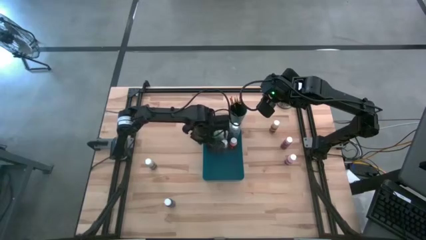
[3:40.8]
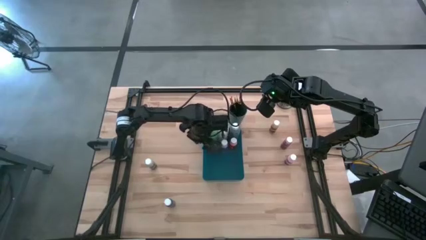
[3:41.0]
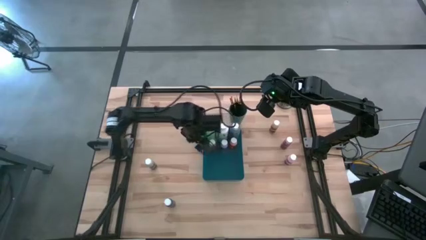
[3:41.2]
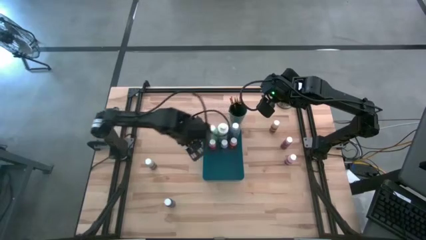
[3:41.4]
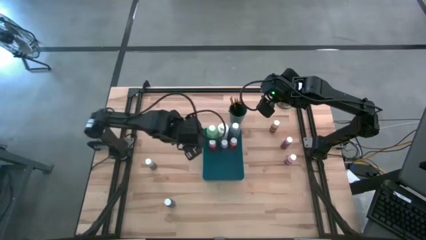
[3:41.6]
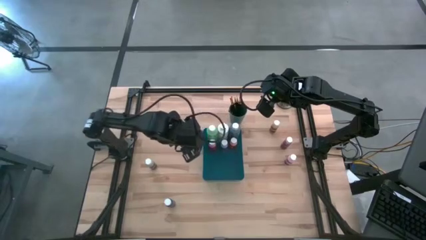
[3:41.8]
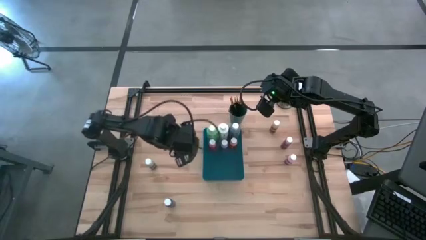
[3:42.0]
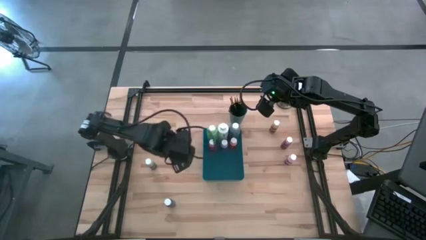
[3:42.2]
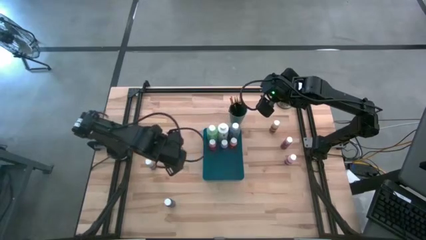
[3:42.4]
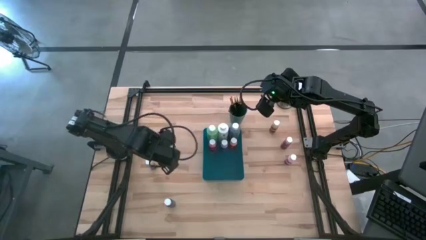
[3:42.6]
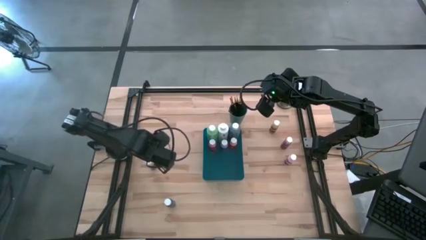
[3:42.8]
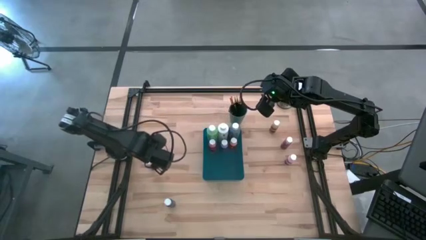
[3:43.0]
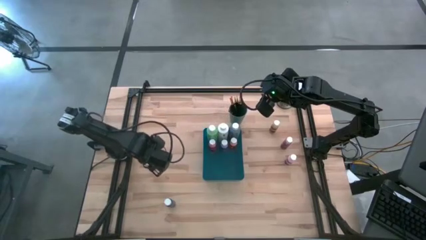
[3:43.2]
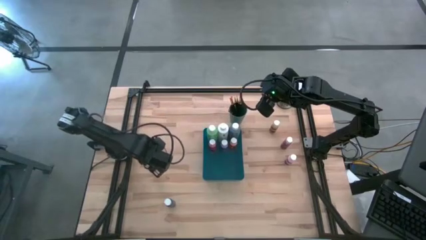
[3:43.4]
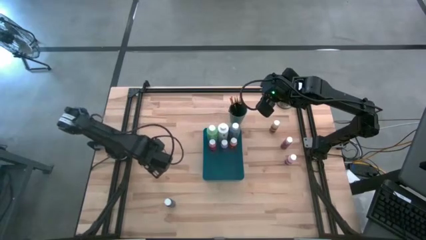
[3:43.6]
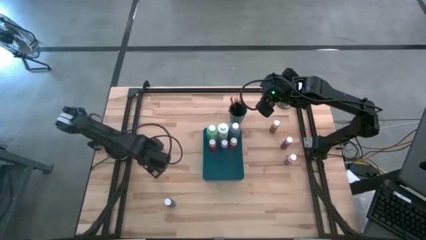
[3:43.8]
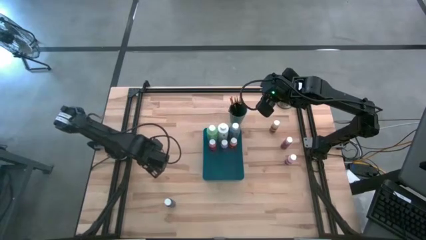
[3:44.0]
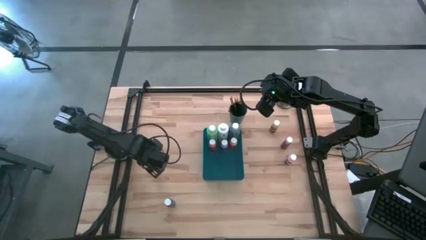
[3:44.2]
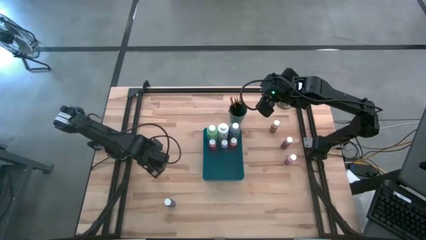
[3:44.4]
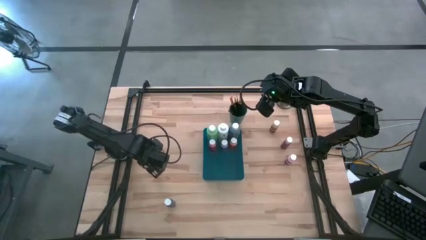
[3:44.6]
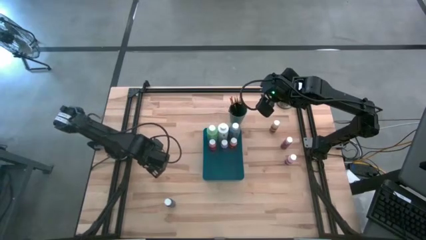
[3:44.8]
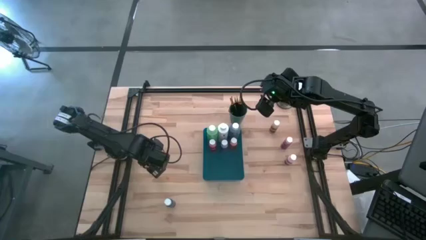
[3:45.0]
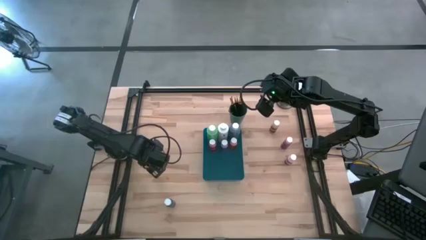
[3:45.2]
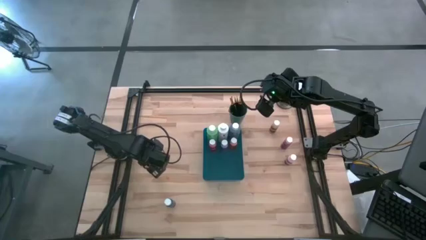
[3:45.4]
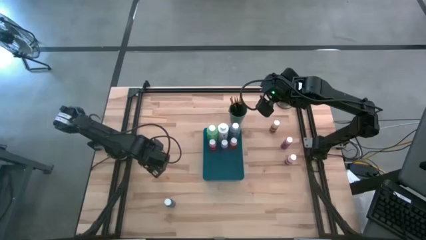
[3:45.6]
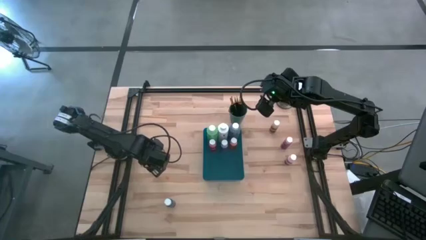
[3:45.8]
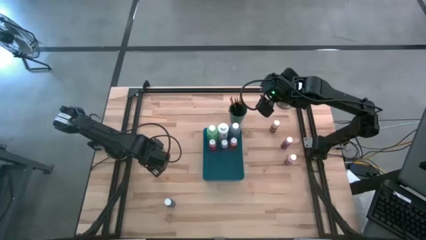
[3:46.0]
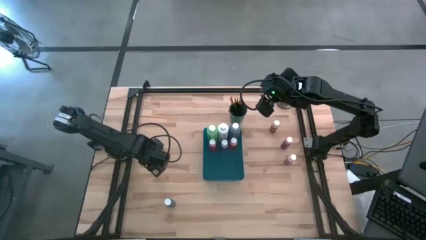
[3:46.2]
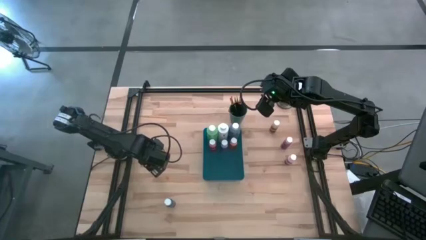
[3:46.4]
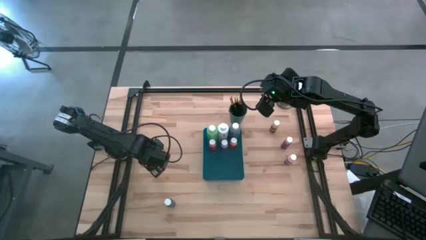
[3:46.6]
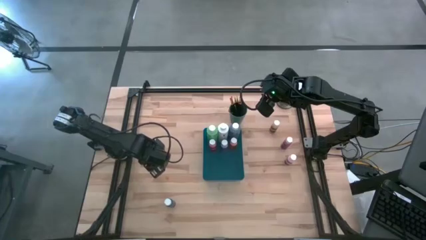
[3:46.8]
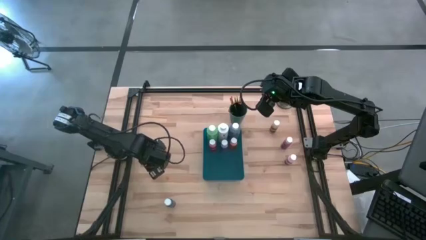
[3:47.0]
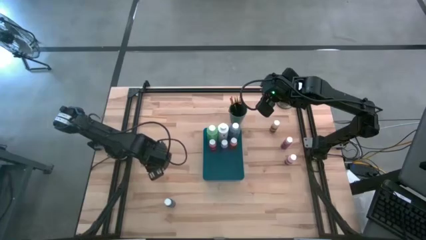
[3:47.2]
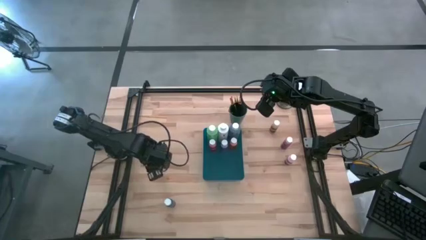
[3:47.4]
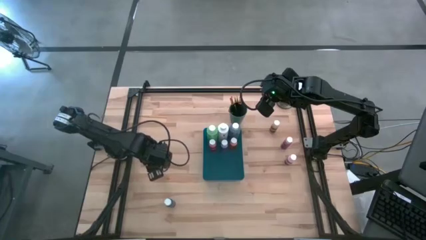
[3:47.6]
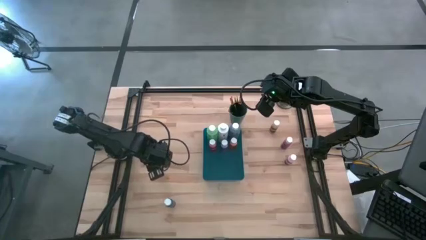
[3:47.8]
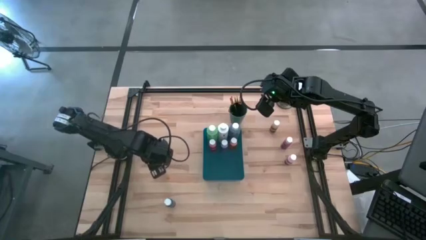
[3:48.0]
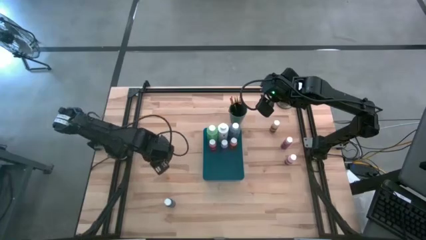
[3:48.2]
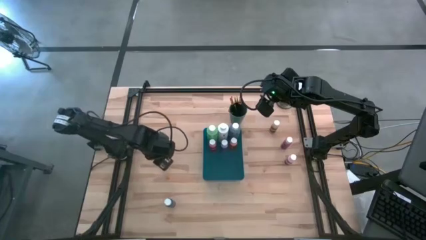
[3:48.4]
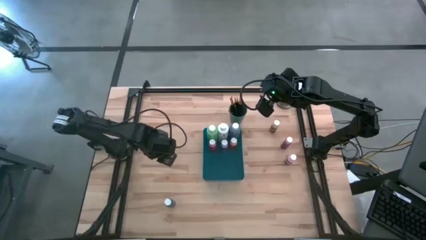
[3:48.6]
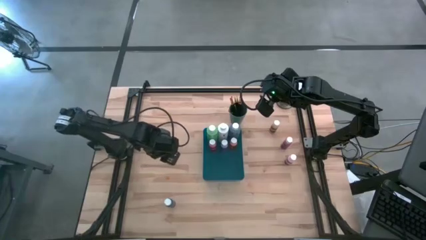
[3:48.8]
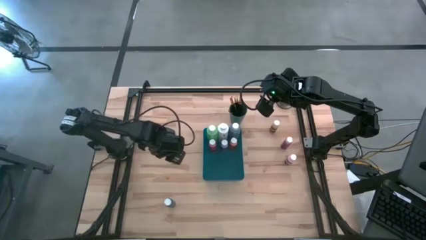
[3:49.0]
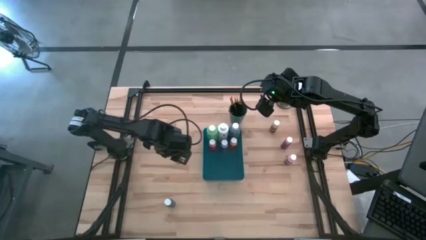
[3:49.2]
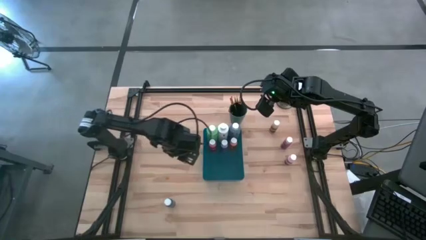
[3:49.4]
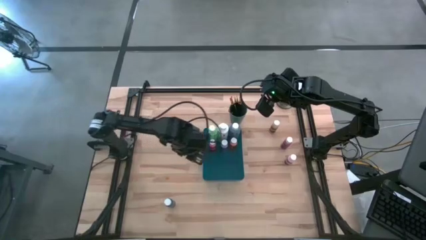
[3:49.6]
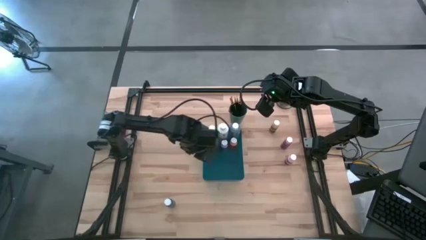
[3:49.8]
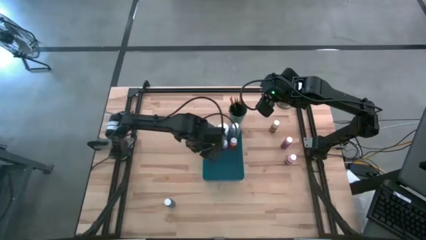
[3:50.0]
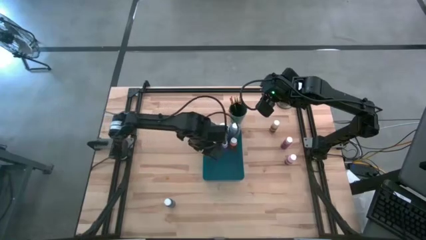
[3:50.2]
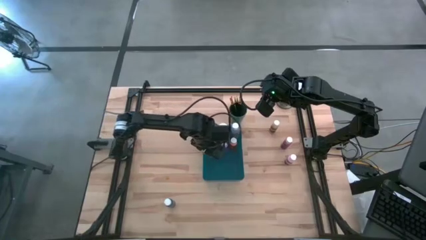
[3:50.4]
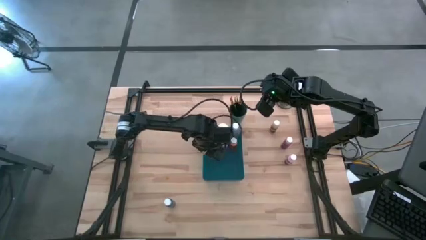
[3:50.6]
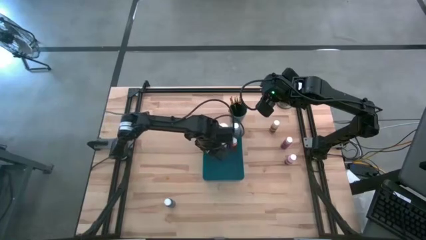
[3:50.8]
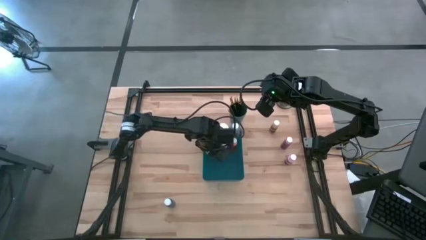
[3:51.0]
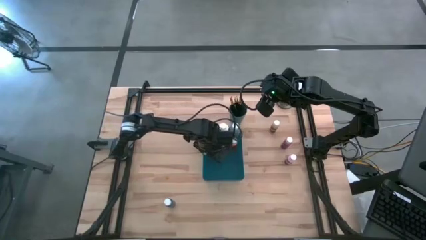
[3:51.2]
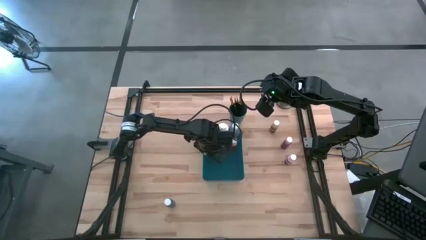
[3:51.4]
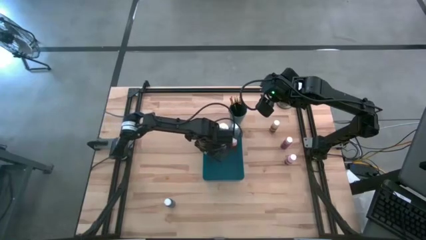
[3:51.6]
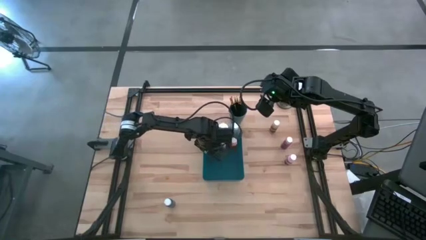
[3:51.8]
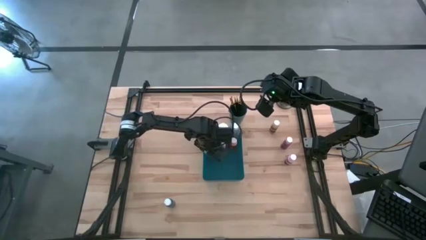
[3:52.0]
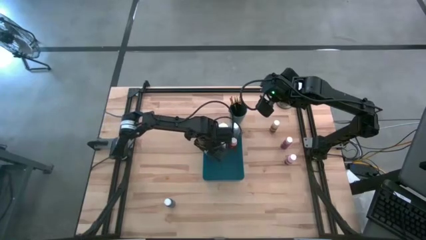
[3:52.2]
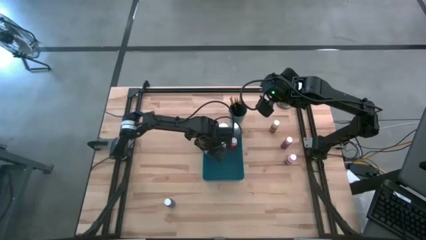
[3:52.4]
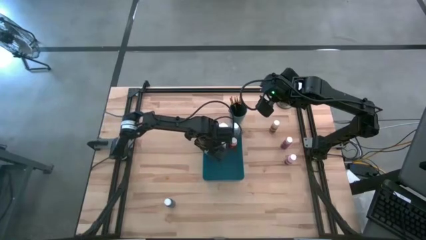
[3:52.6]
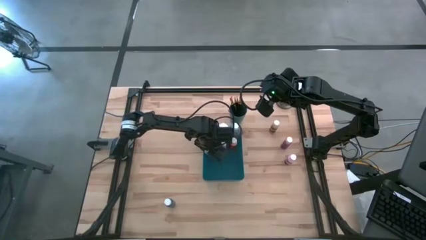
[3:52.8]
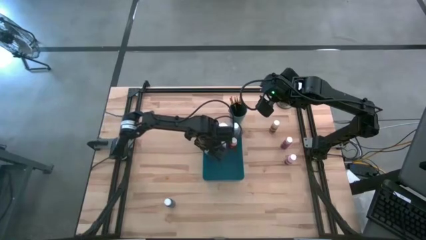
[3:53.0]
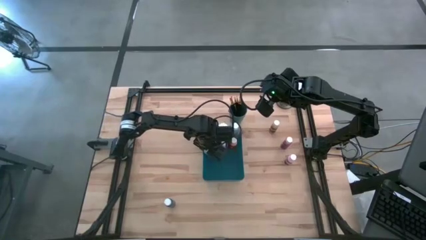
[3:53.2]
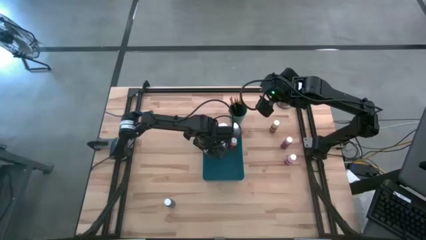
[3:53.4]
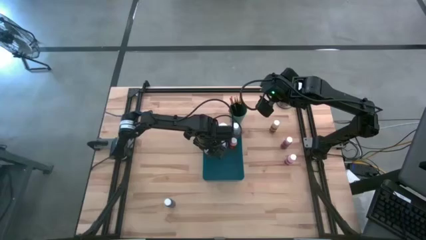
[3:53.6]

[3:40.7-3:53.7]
Task: Pick & Place Paint Supplies
Put the small gray paint bottle into the blue bin

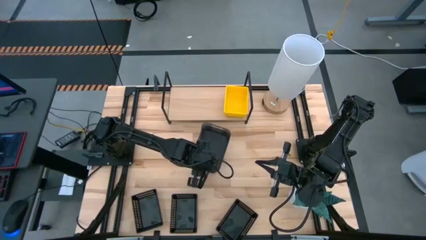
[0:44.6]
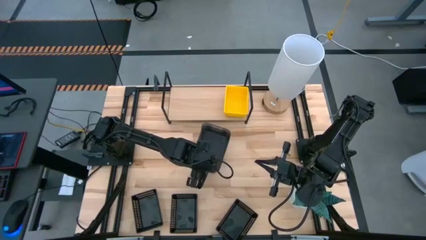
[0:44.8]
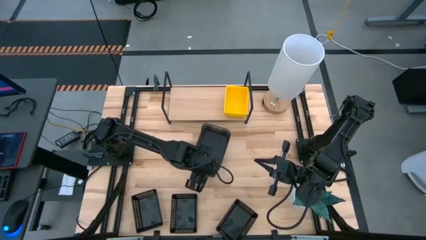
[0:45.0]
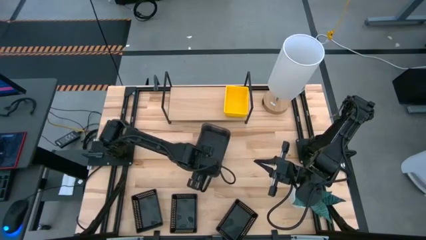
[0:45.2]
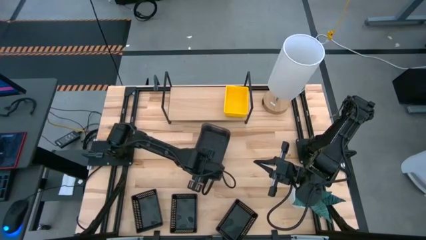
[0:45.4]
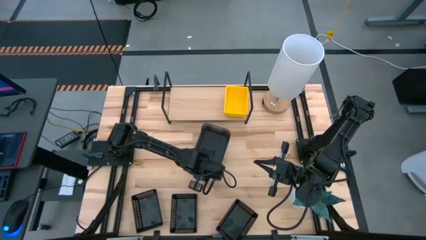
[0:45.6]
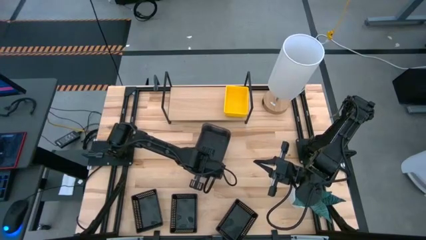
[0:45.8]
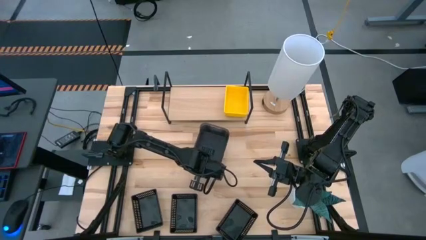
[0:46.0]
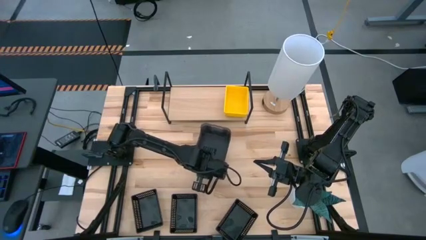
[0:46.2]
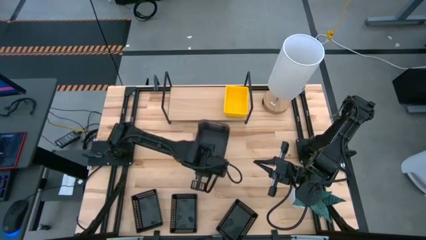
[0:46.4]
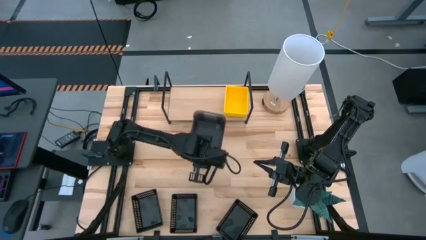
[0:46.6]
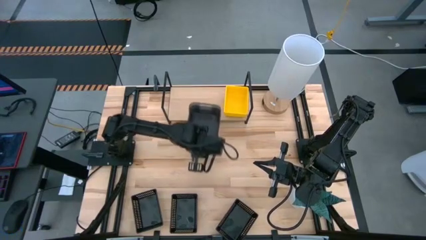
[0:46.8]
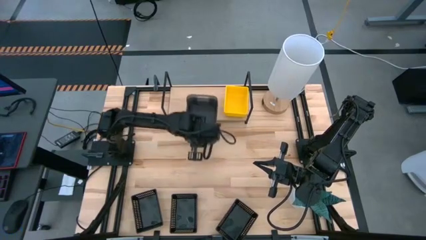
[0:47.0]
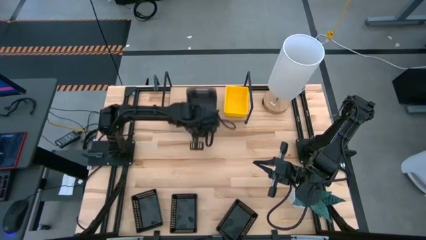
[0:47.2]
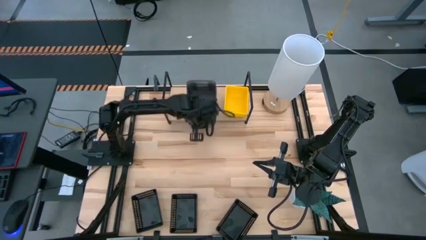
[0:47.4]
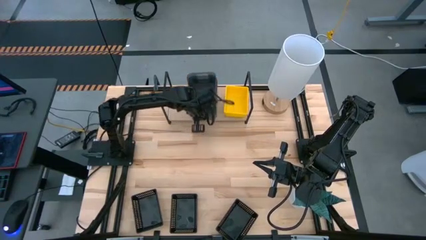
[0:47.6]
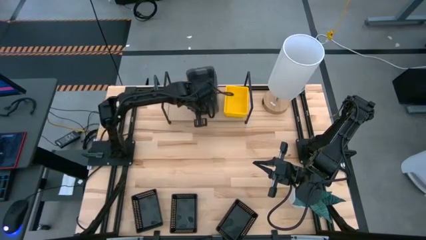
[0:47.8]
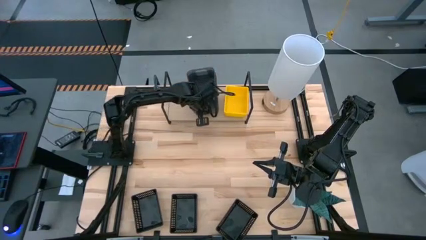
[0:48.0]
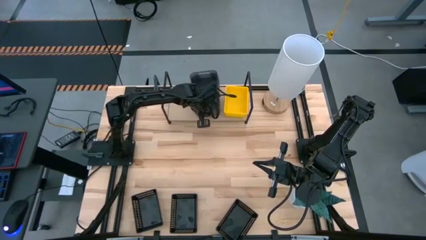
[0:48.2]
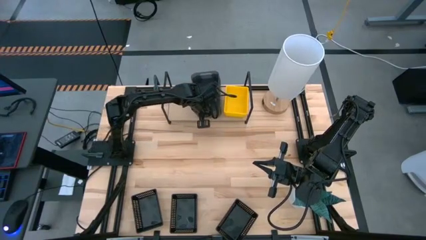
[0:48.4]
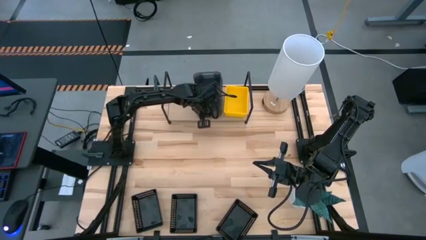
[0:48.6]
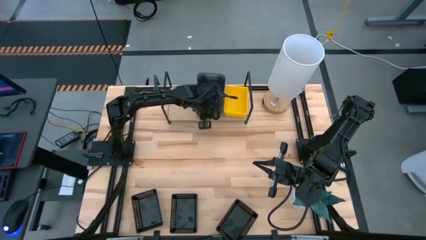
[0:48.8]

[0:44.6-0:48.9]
Task: Stack baskets on shelf by color
Put the stacked black bins on the shelf
